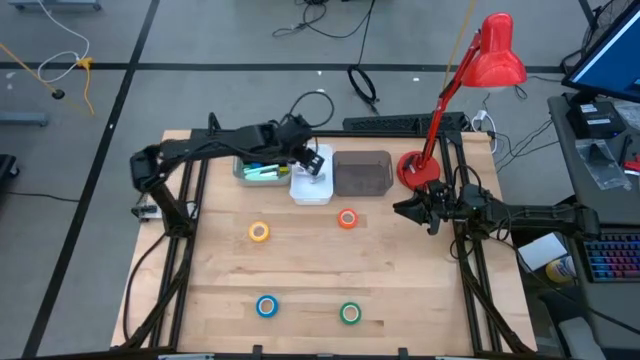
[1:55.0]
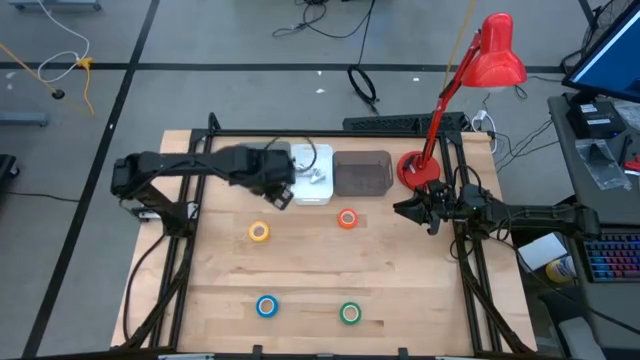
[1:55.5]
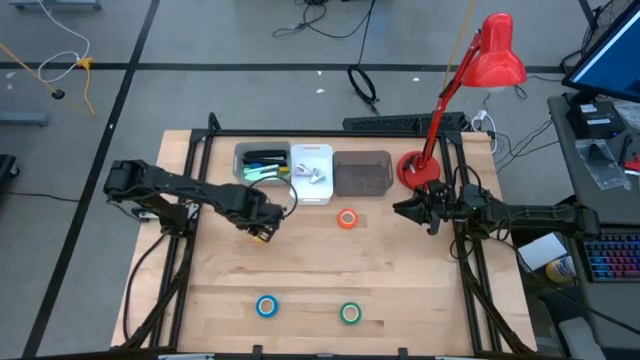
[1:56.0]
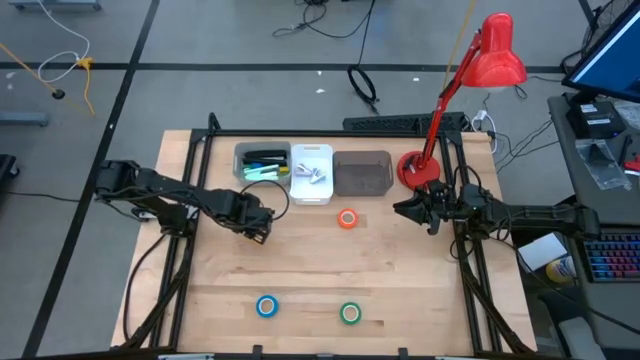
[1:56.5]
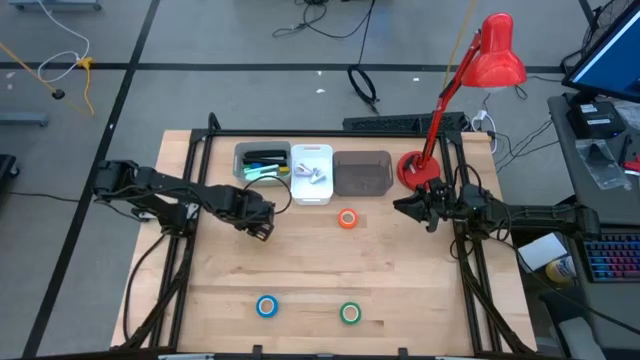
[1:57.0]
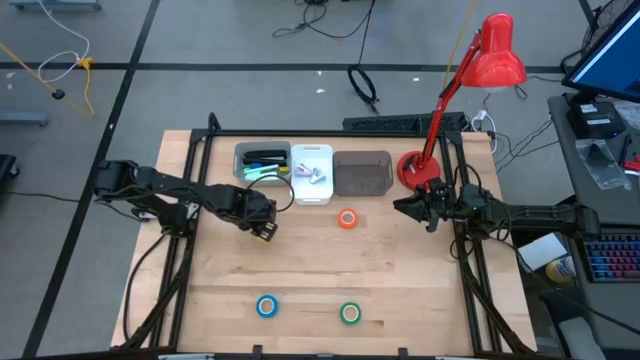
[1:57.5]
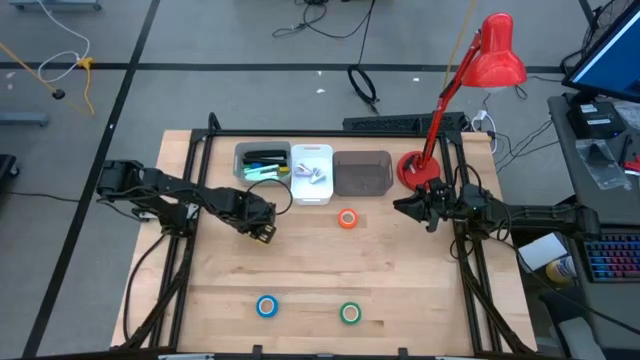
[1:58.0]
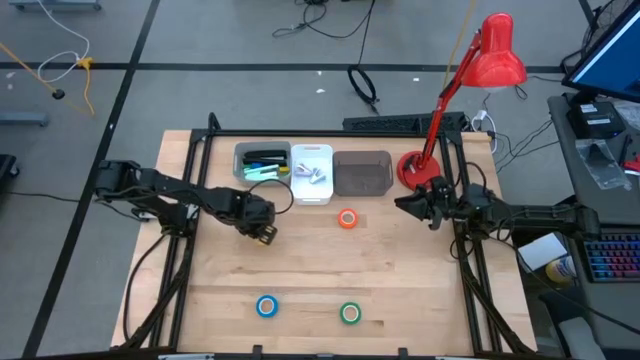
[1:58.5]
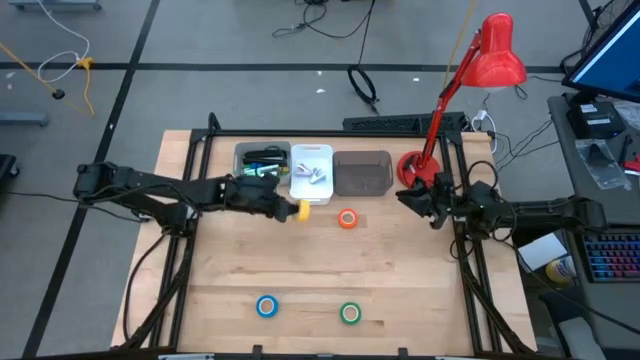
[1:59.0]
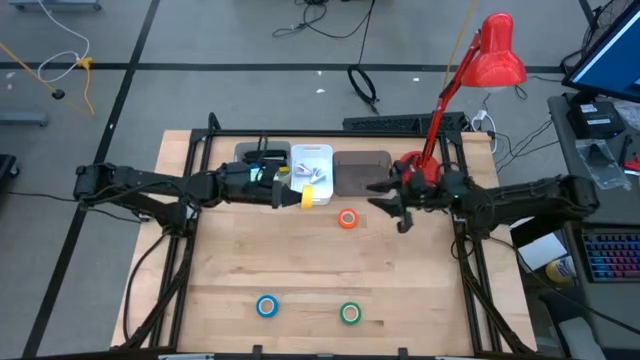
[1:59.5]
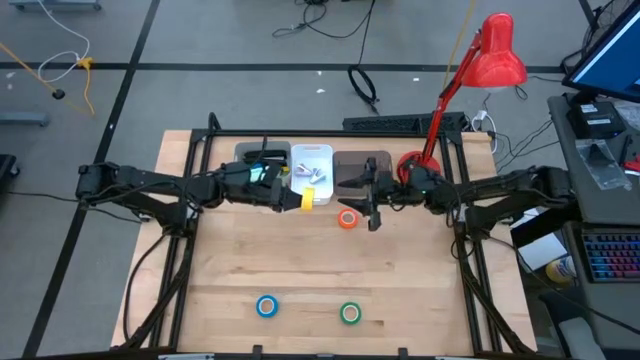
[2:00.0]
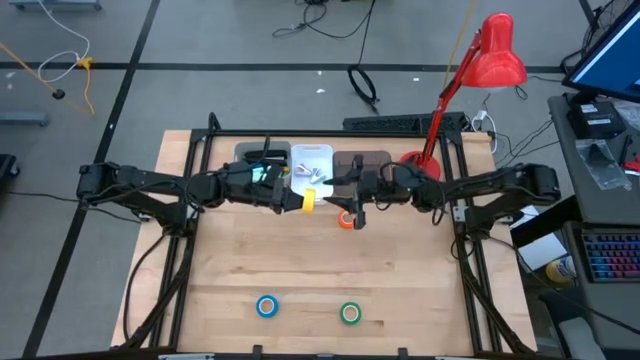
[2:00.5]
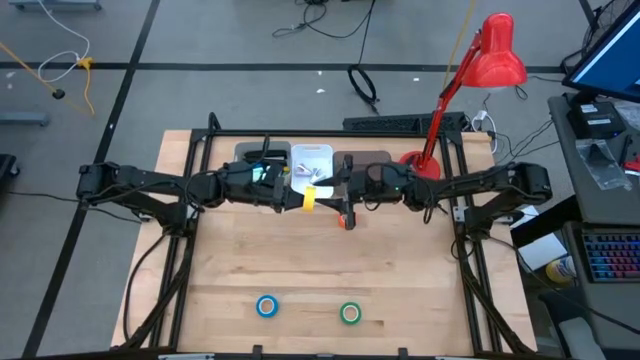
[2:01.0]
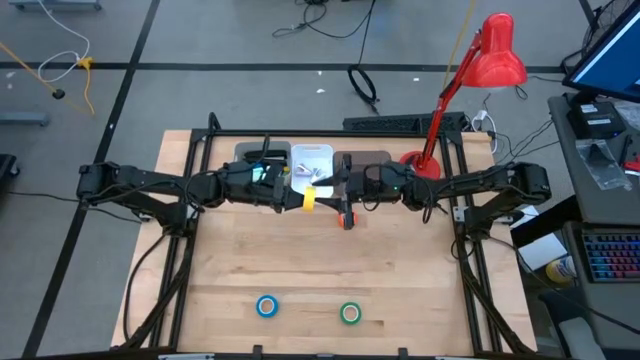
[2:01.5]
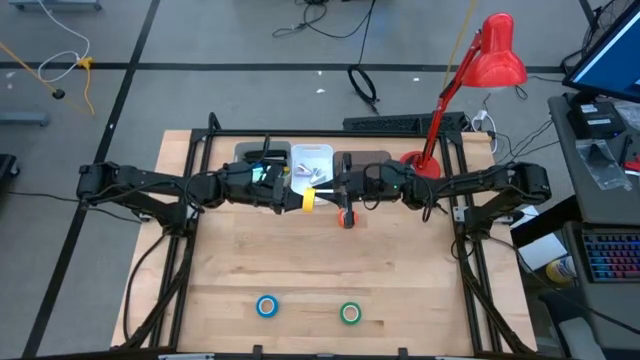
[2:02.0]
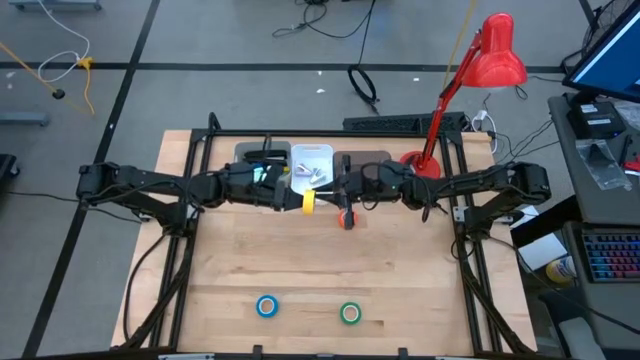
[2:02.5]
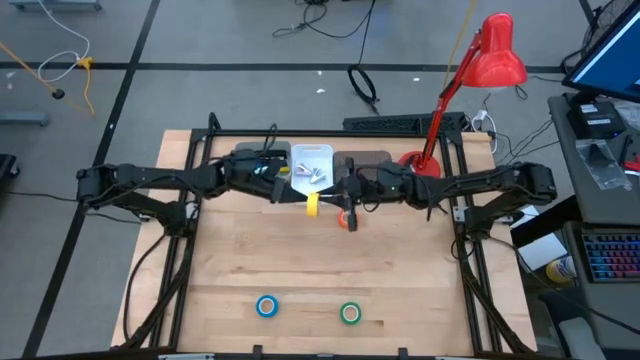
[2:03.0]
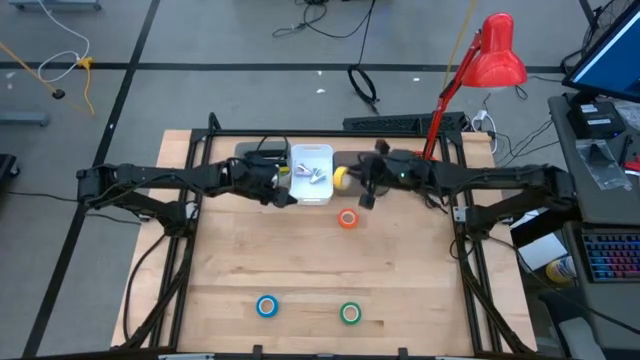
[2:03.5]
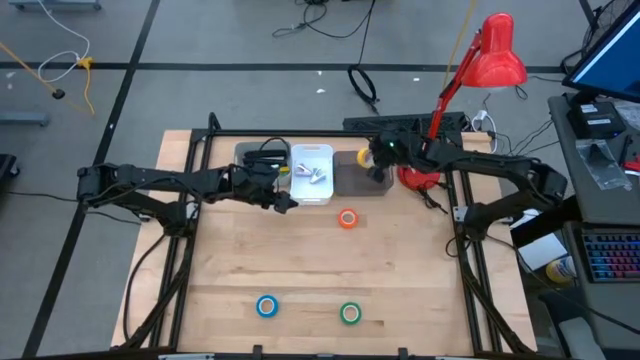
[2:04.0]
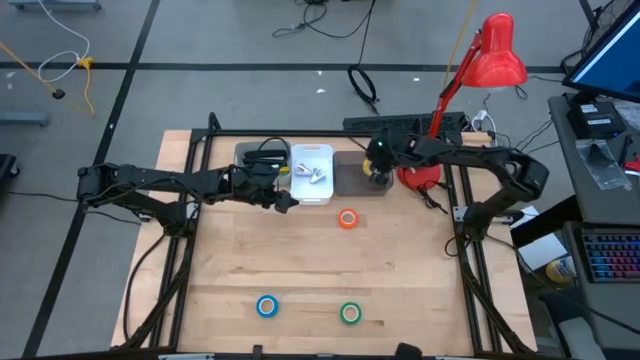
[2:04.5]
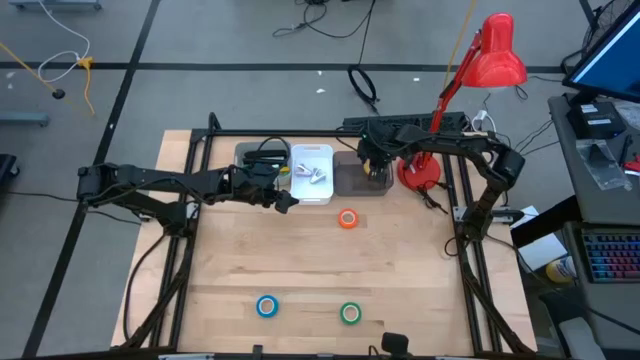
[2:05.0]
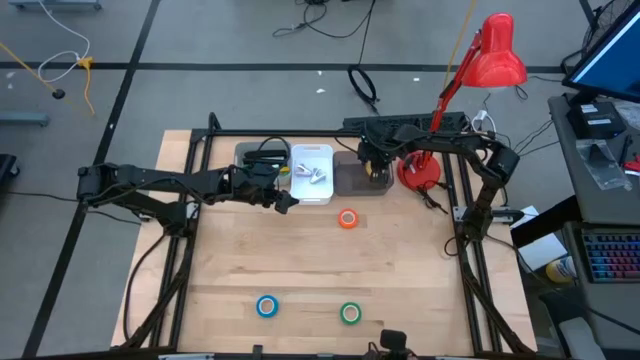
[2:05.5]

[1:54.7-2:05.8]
Task: Pick and place Stapler, Stapler remover, tape
Put the yellow tape into the black bin

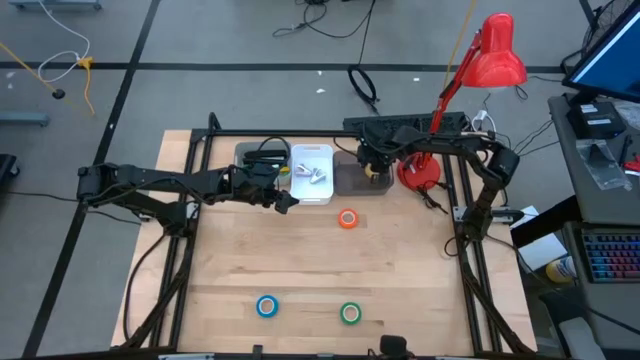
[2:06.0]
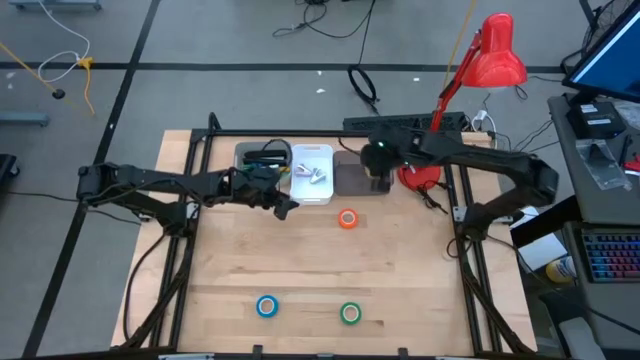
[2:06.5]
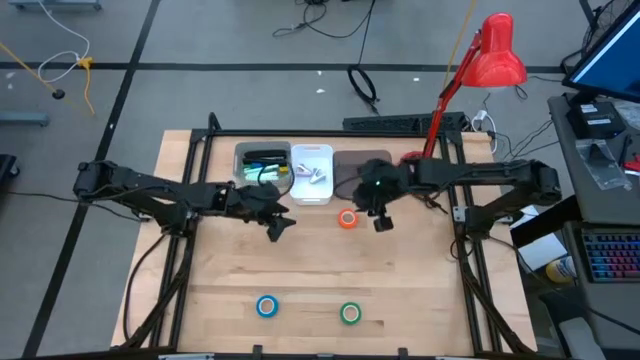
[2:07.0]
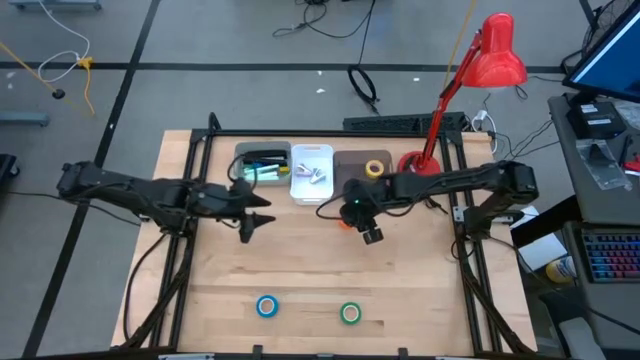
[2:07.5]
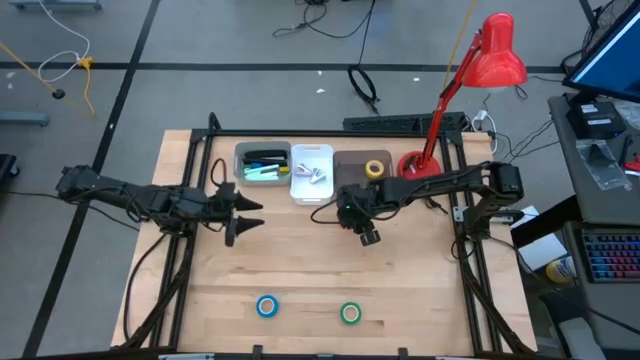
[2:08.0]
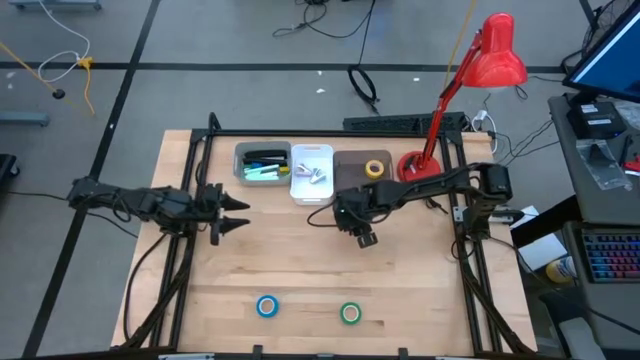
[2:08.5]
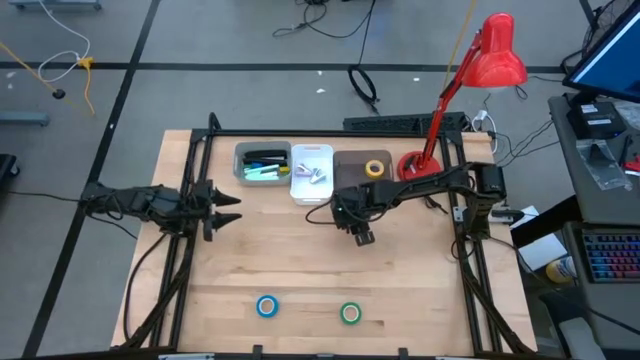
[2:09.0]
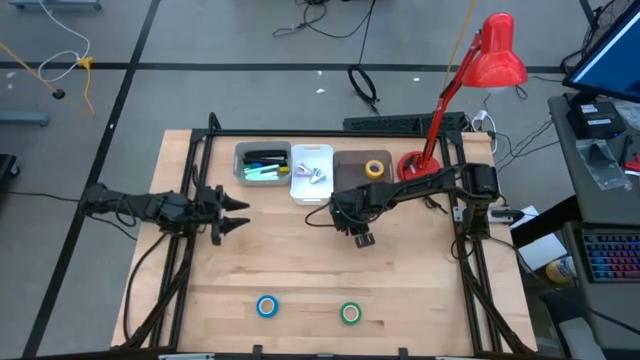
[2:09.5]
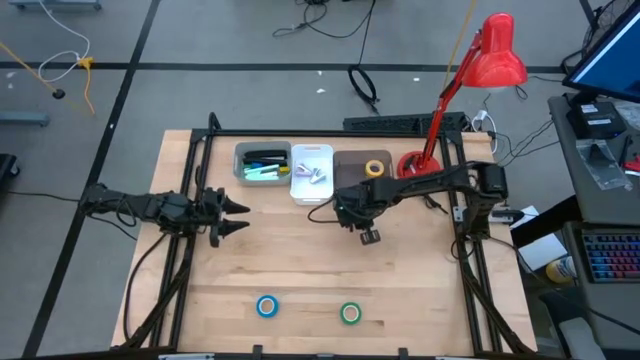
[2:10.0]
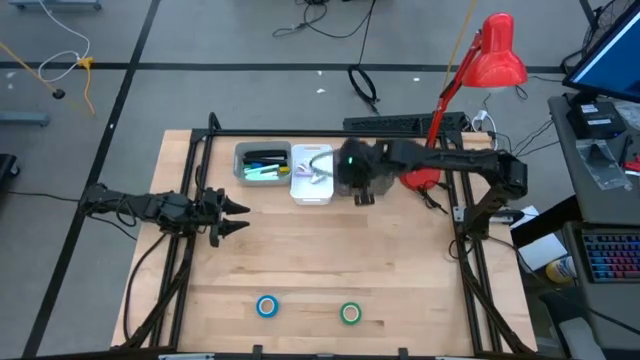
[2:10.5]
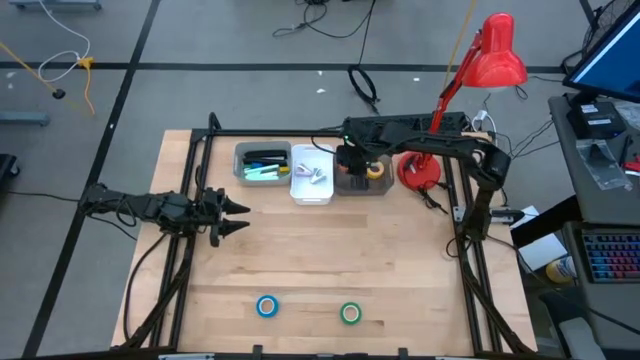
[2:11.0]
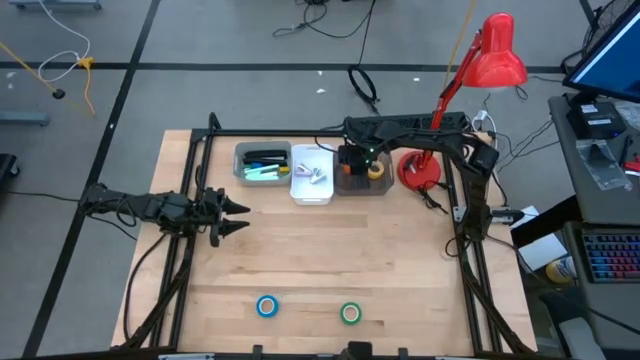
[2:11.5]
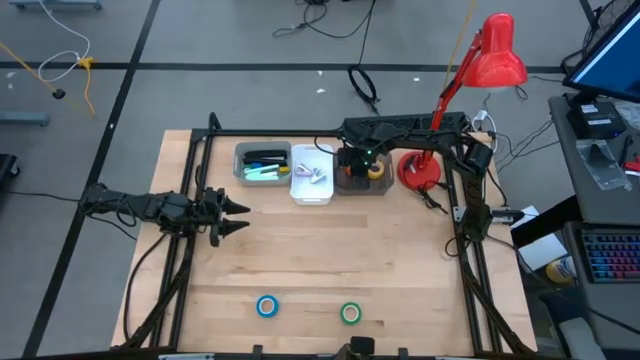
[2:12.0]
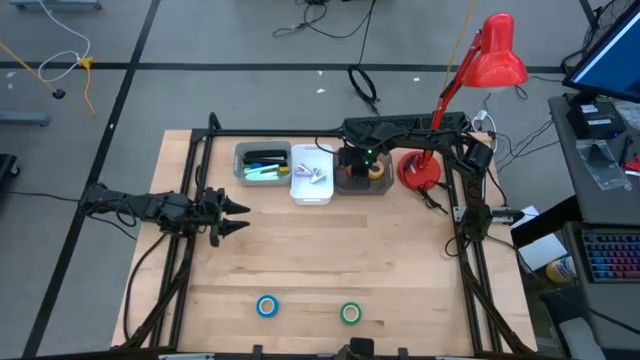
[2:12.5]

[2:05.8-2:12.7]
Put the orange tape into the black bin

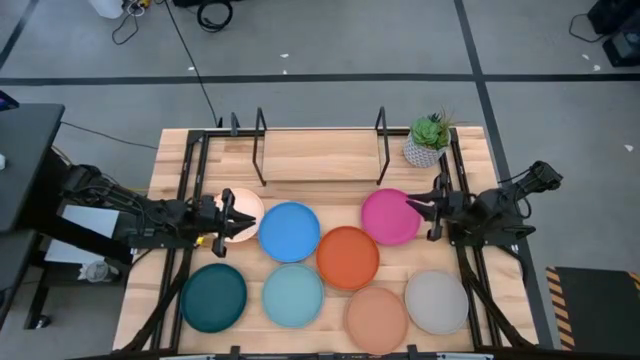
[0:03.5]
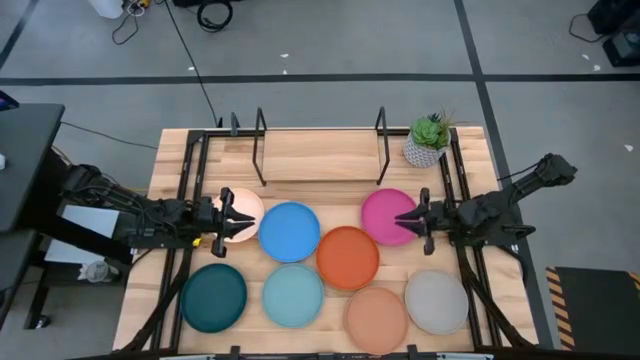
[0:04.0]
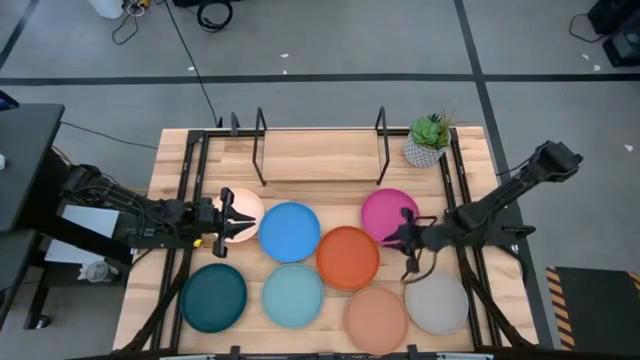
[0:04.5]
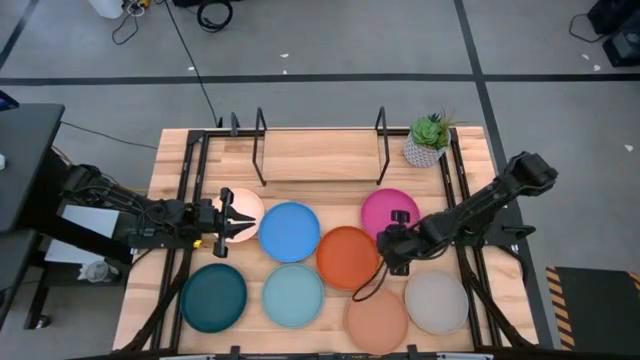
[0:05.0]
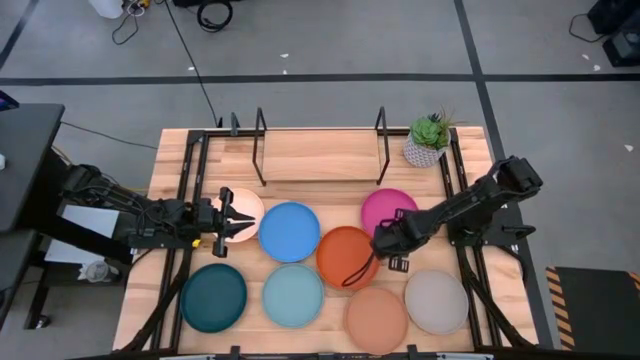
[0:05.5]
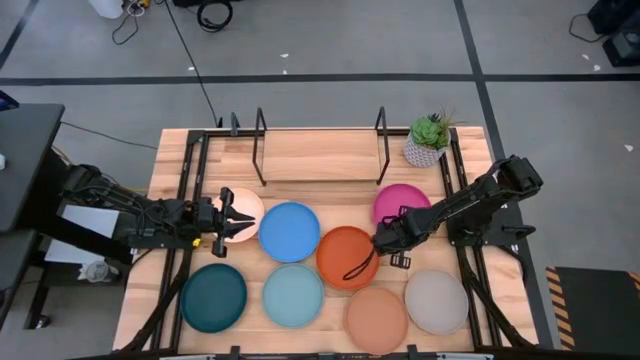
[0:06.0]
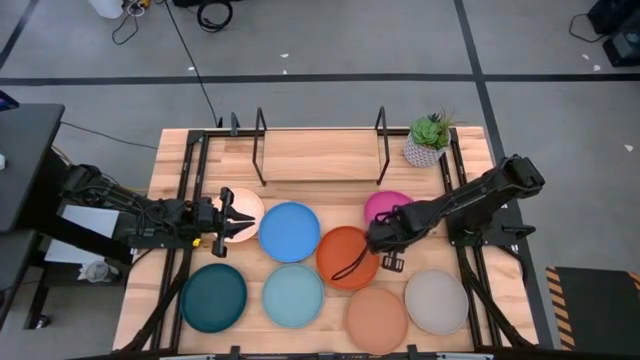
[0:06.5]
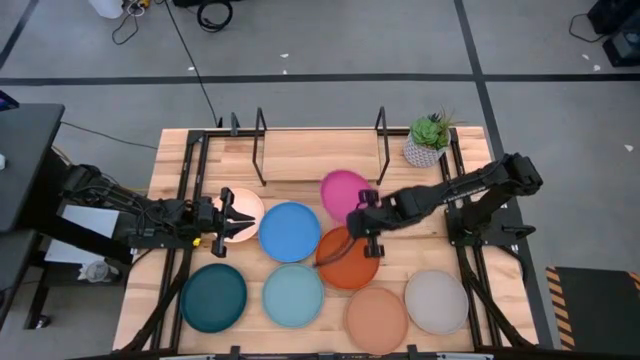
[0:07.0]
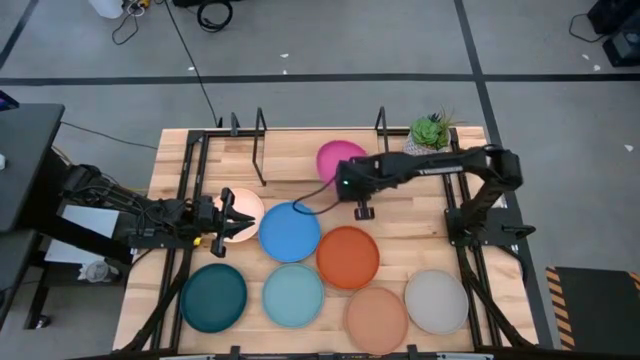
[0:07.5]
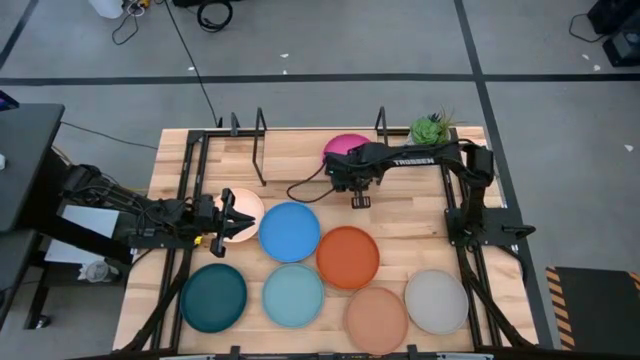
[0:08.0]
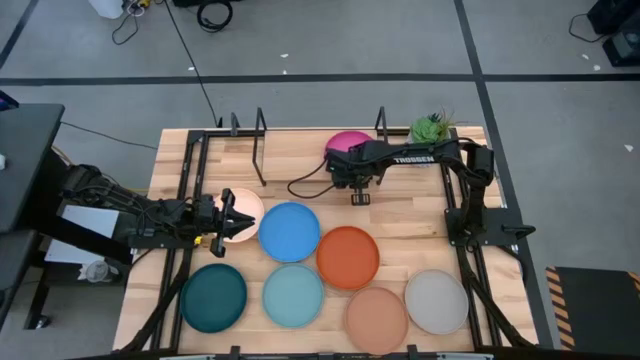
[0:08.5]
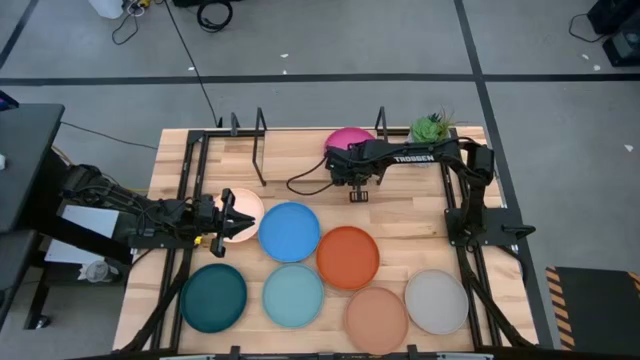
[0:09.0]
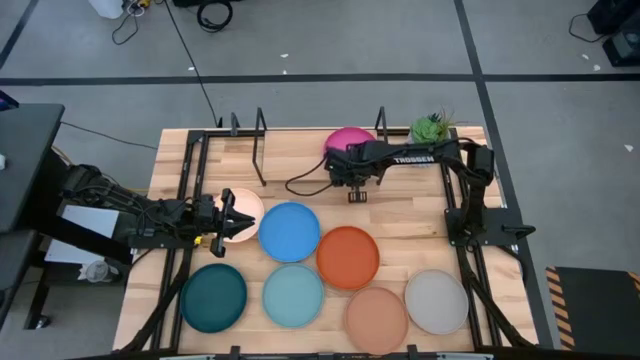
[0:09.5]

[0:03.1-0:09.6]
Task: Place and stack plates onto a shelf
Put the pink plate on the shelf
